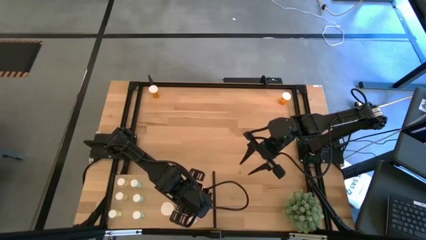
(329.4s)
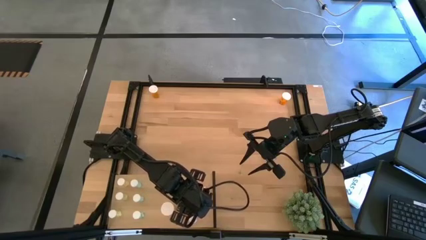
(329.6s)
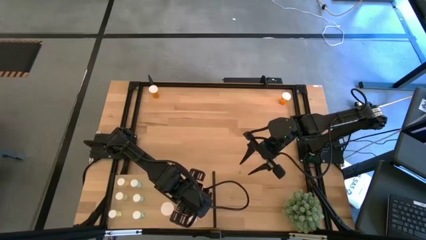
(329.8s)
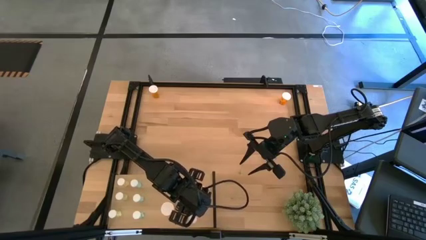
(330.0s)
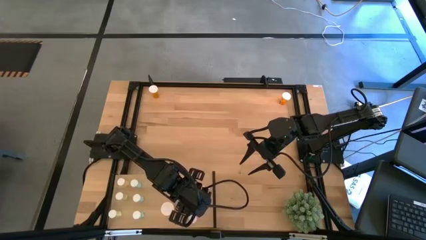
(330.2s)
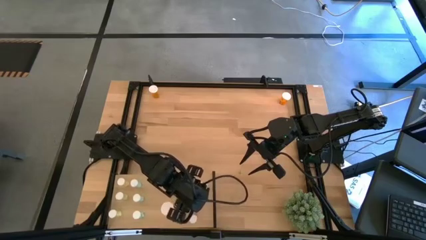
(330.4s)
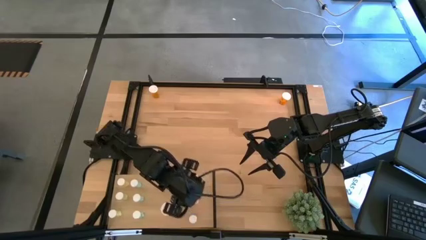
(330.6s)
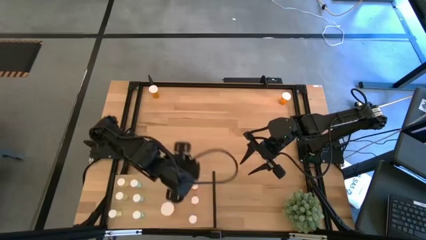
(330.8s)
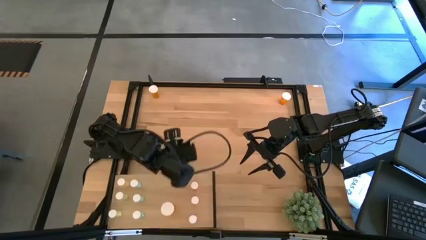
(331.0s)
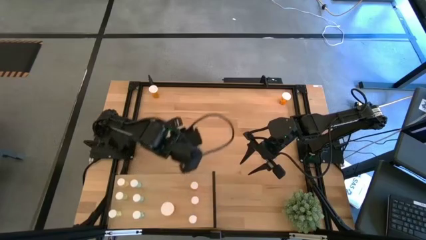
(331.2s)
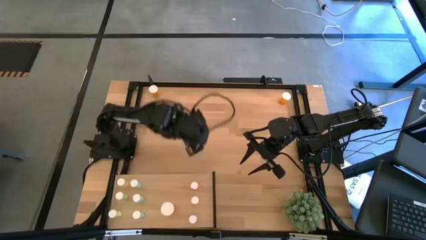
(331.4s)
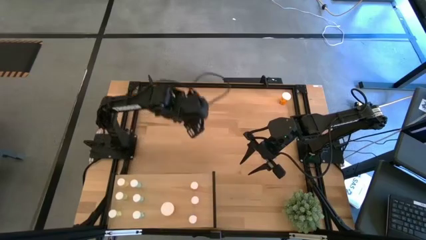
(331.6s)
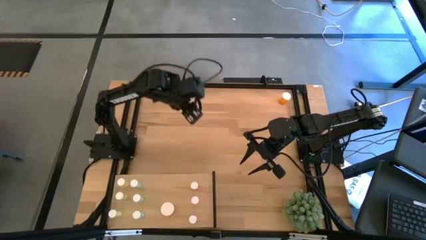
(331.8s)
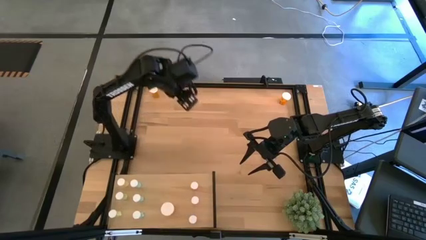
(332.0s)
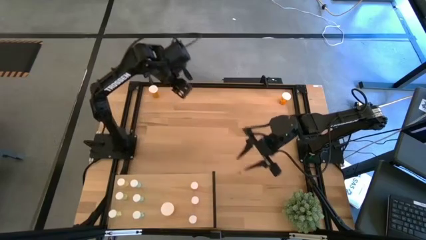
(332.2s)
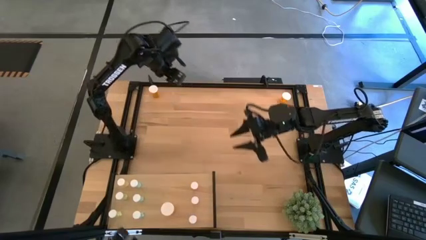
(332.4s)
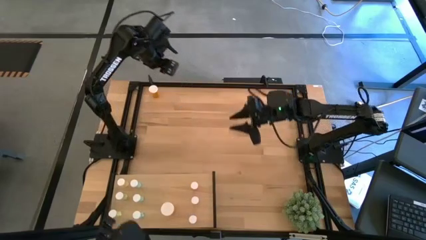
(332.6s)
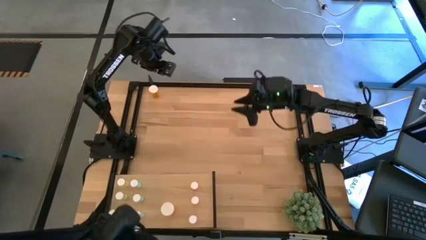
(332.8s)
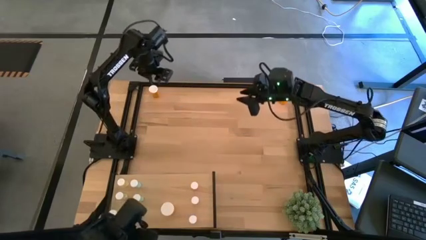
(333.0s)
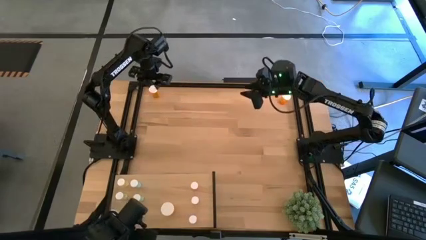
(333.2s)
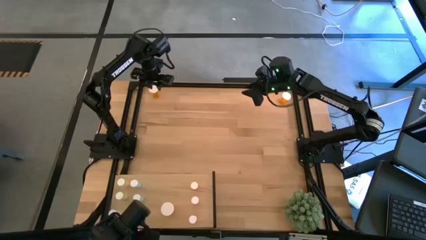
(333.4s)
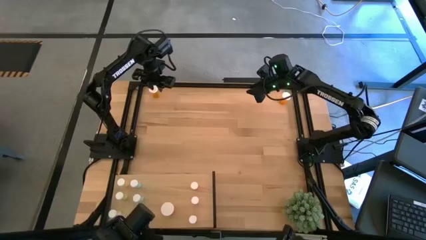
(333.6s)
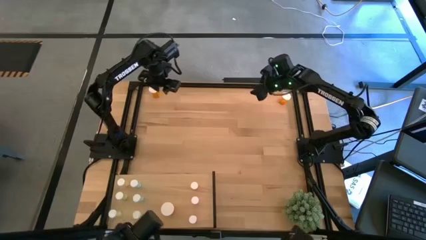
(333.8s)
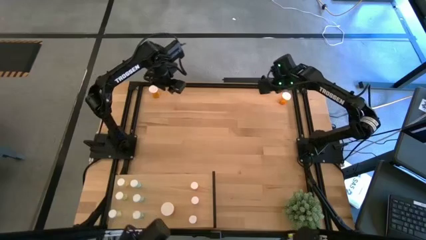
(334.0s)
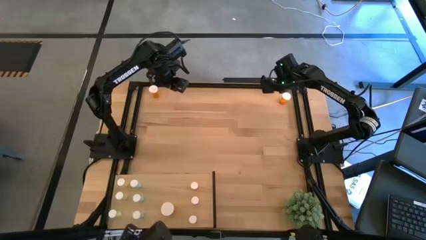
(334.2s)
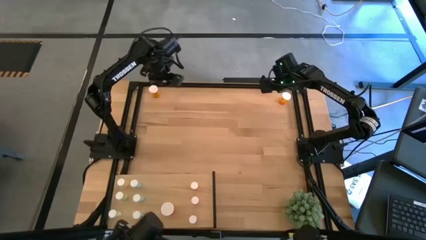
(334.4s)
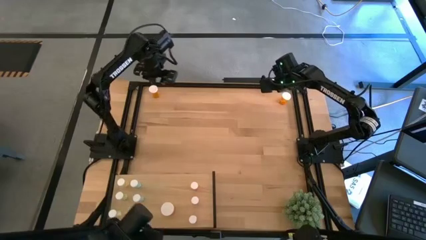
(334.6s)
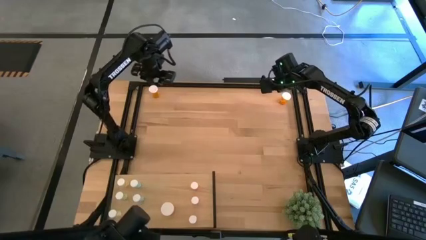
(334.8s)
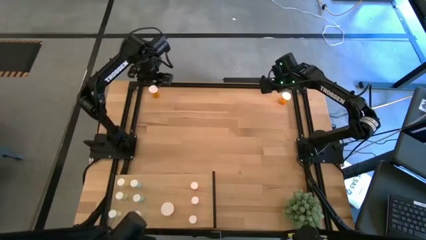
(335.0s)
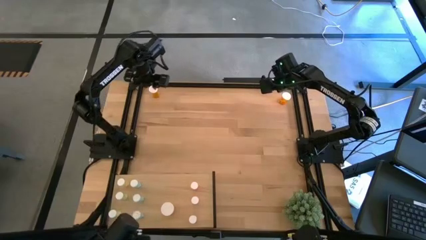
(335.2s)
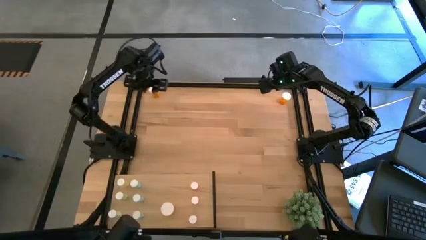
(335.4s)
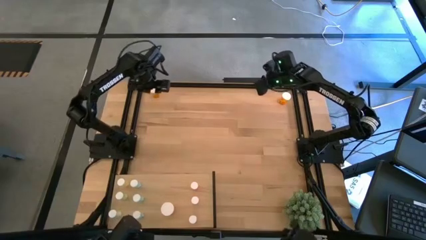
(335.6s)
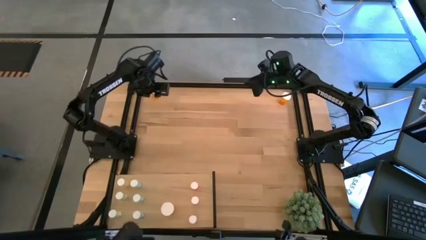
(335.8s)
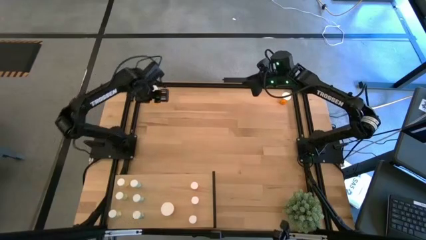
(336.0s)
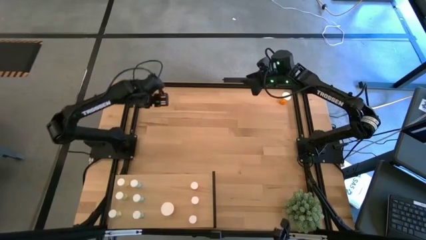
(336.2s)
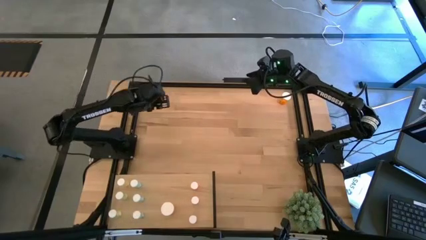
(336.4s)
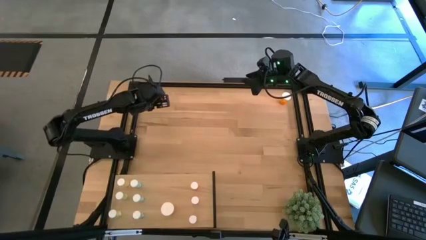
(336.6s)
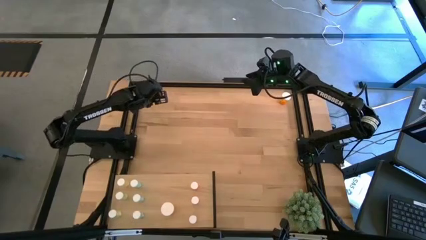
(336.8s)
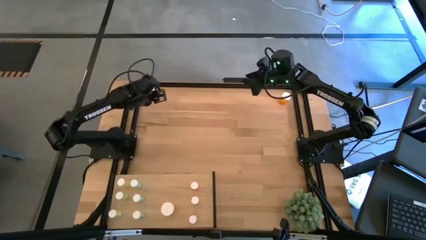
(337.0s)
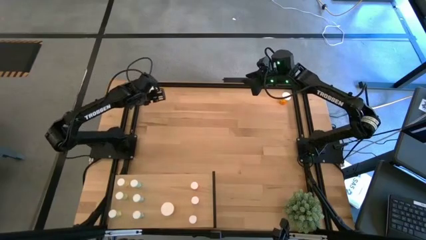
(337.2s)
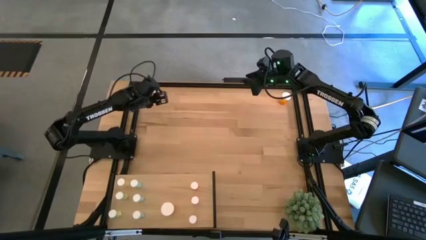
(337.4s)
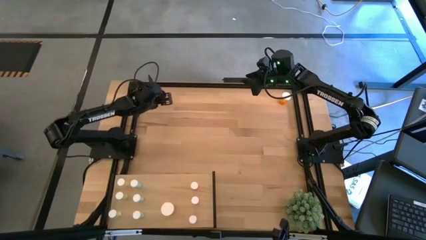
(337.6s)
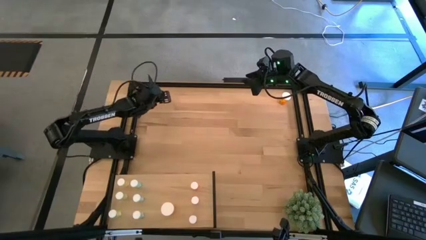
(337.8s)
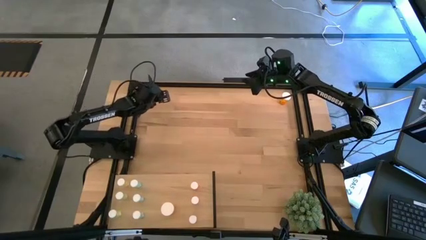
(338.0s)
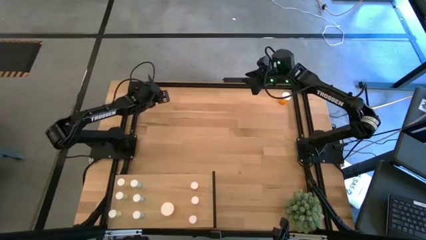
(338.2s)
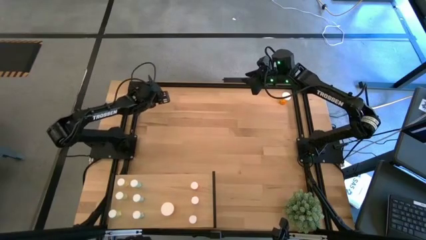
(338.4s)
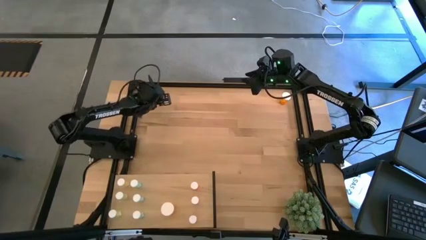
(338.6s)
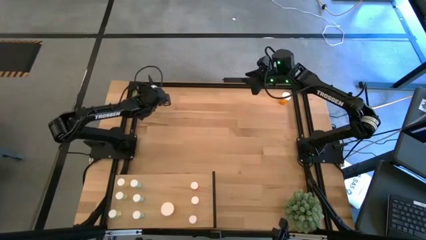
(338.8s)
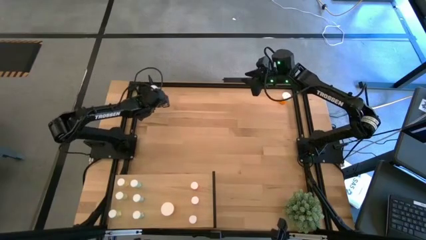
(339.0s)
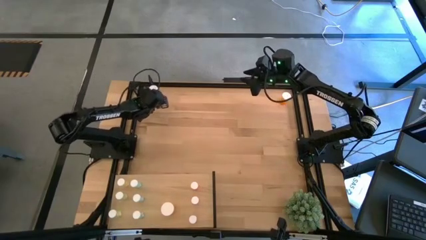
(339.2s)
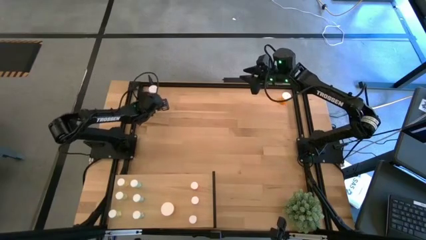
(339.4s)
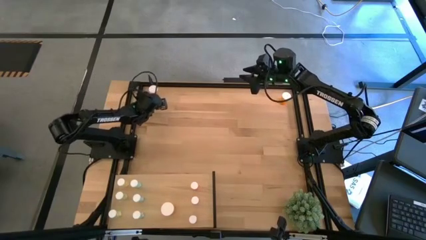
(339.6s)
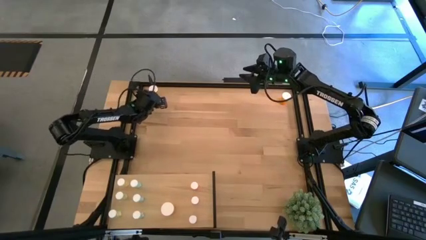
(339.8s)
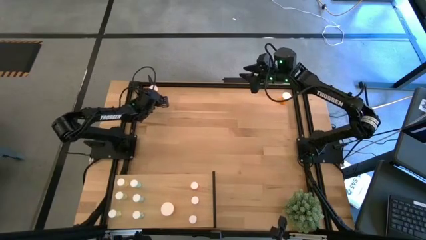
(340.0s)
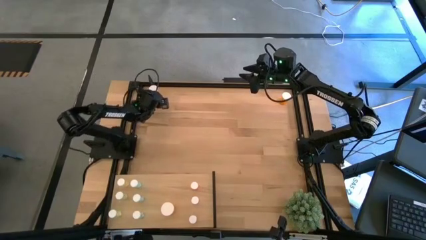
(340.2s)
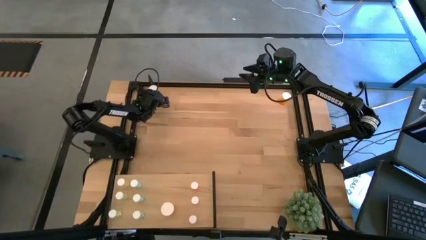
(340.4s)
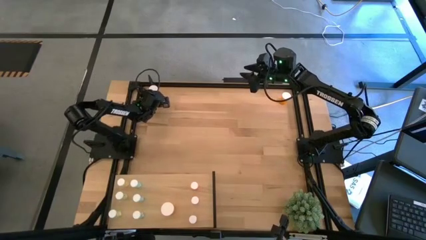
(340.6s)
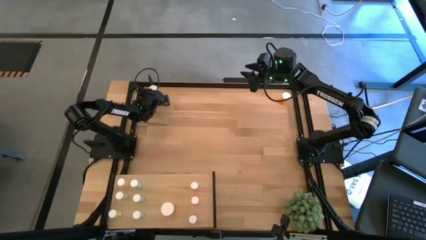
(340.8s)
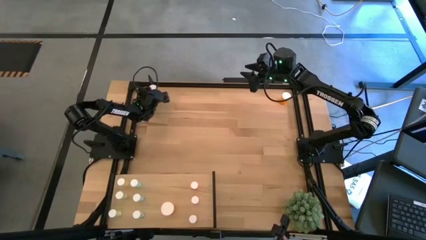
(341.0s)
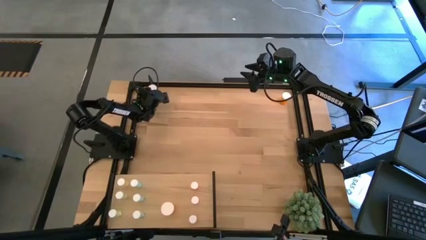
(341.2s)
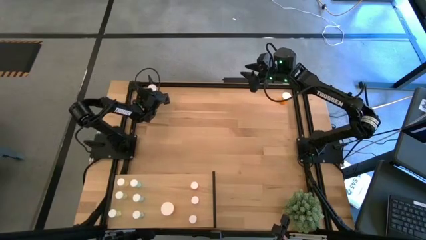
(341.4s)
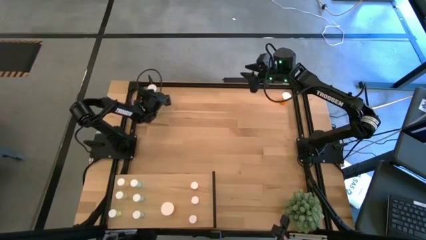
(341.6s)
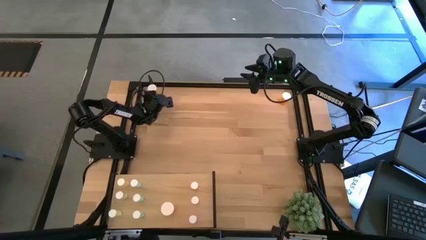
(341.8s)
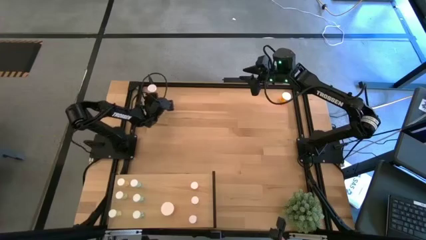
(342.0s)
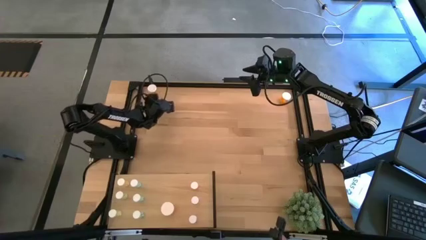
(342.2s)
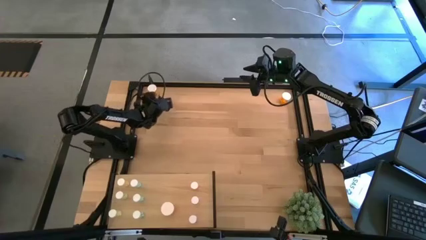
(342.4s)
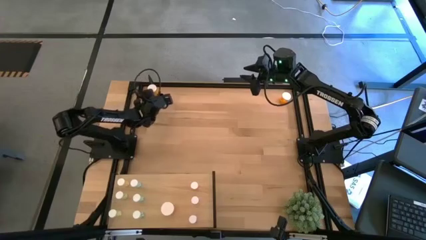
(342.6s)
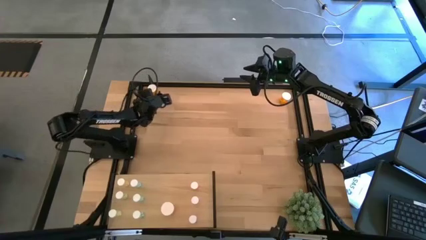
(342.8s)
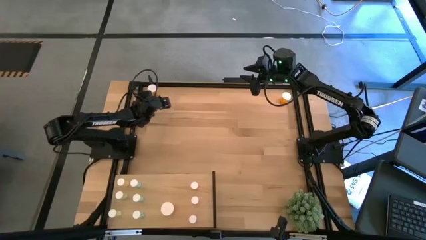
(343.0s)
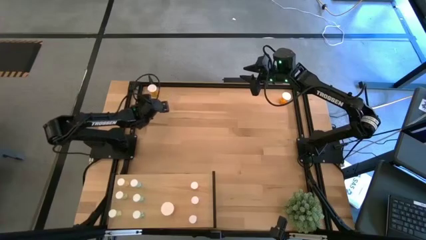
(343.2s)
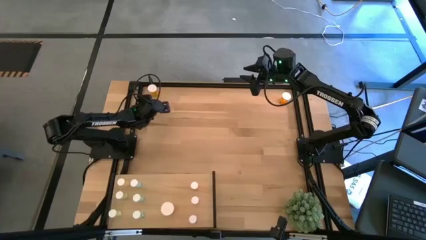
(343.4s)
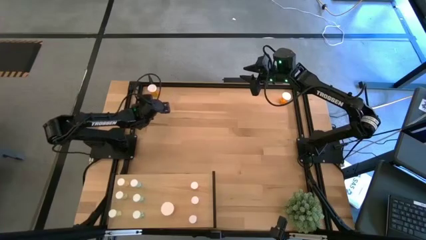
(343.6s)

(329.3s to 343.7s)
Task: Pick and place medicine bottles onto shelf by color
Put the top left orange pill bottle on the shelf aligned with the other orange pill bottle

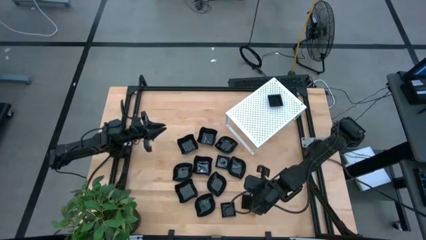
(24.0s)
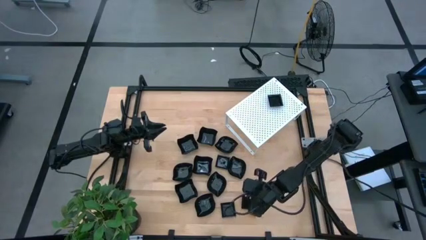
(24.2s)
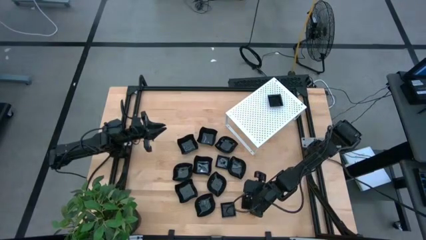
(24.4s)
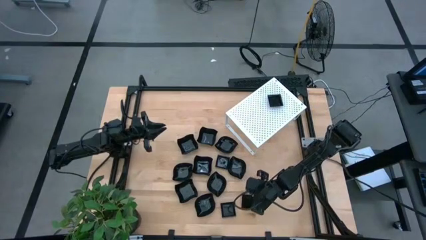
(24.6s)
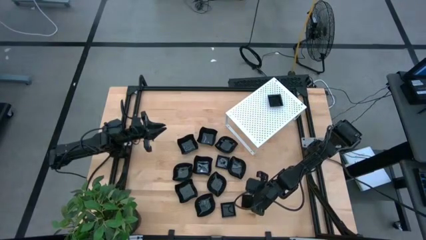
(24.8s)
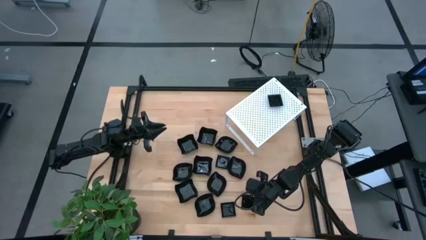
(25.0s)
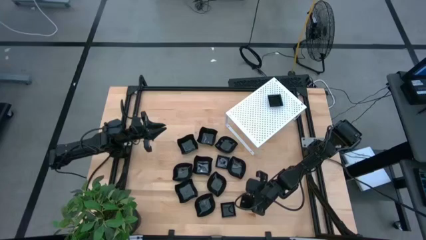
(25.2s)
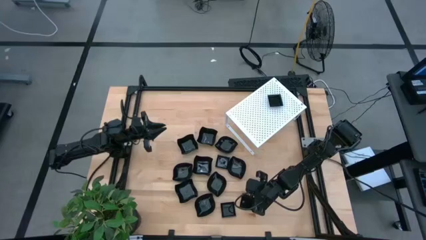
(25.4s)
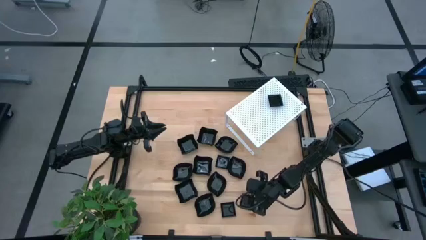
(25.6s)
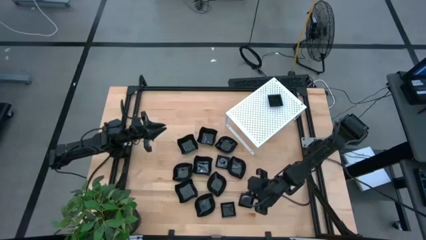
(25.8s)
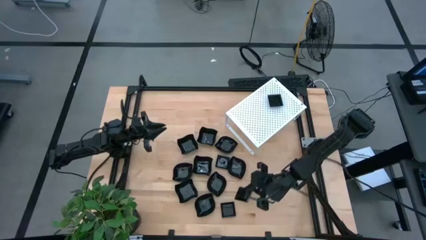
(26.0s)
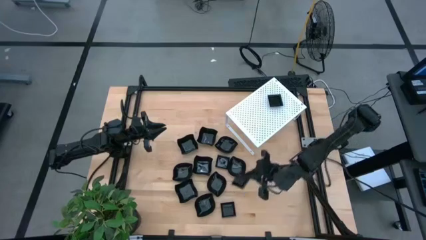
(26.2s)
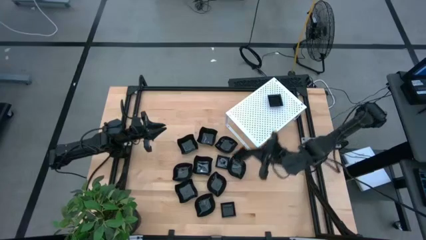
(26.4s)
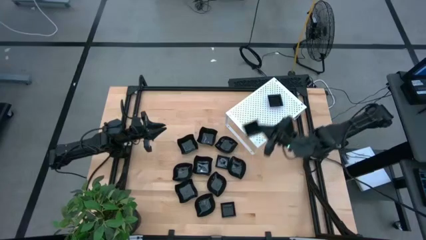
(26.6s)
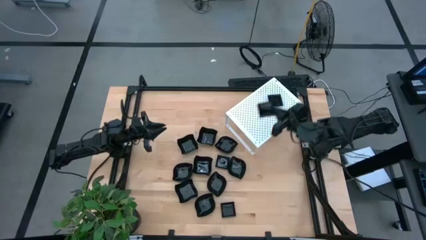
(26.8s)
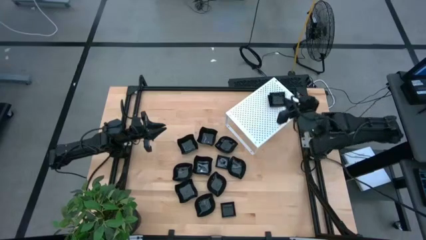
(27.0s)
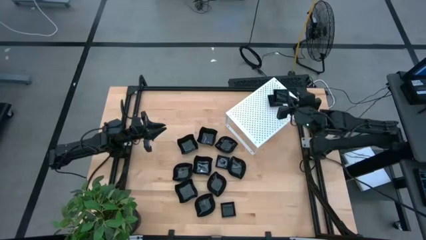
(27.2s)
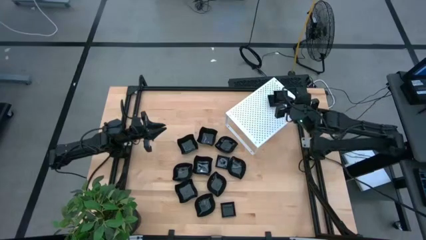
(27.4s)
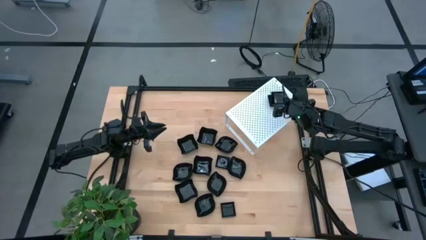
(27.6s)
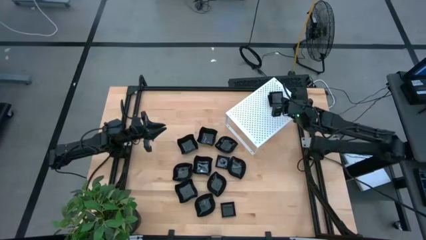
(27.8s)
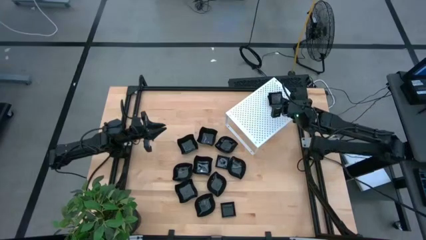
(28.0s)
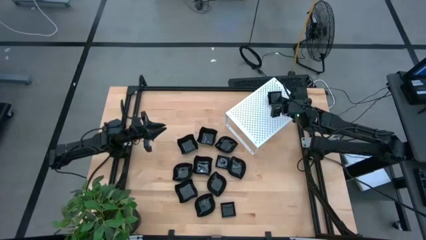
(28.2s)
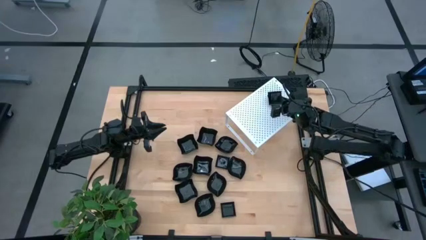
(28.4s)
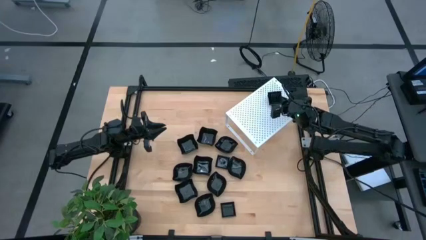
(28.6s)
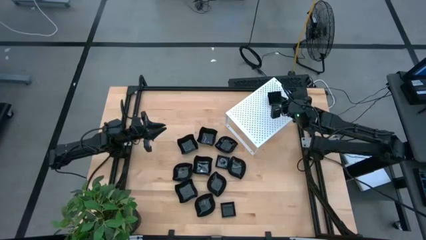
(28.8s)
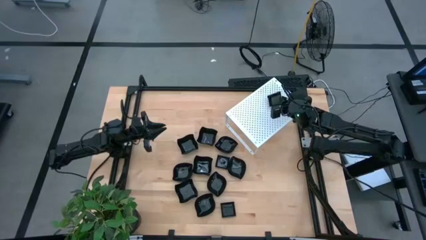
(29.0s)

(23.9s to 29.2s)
Task: Pick & Place Mini shaped plates
Stack the black square plate on top of the black square plates on the shelf
